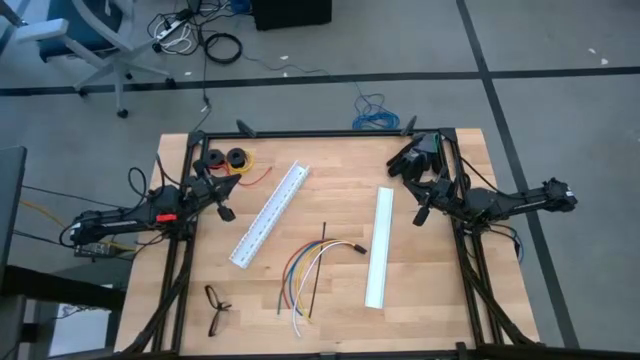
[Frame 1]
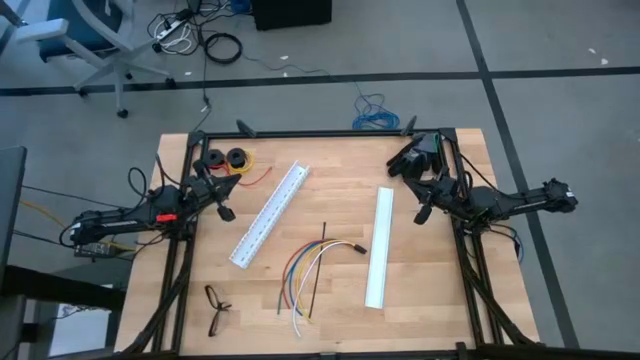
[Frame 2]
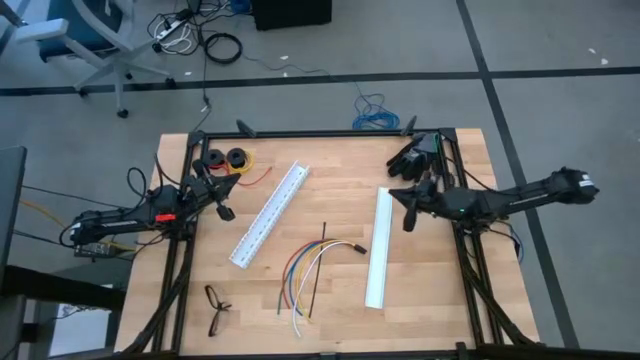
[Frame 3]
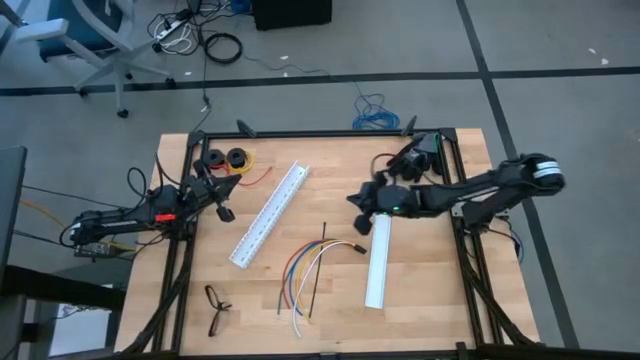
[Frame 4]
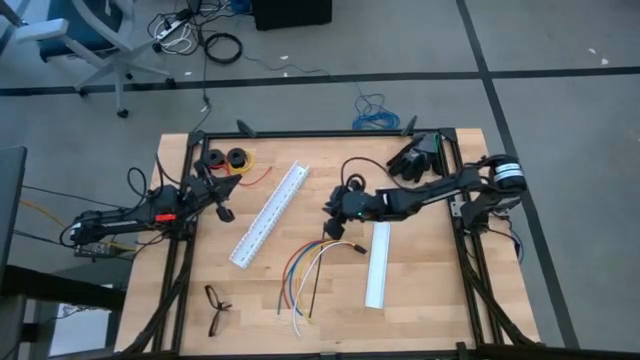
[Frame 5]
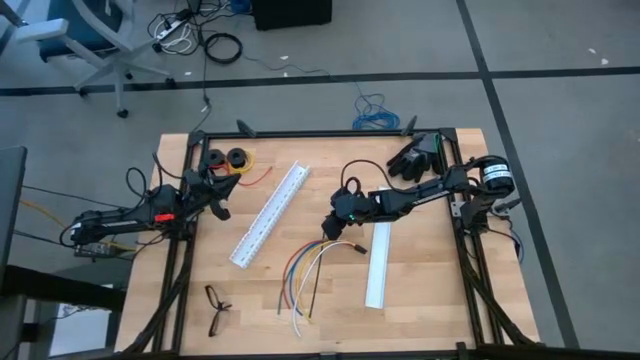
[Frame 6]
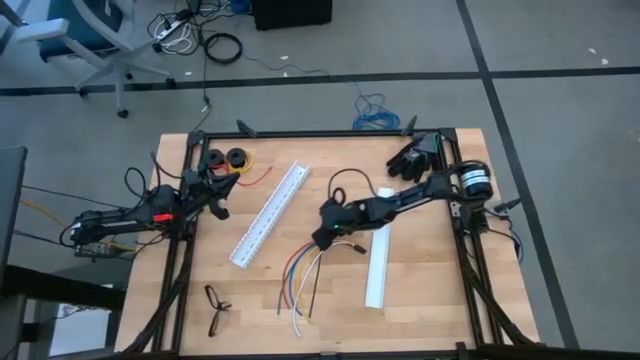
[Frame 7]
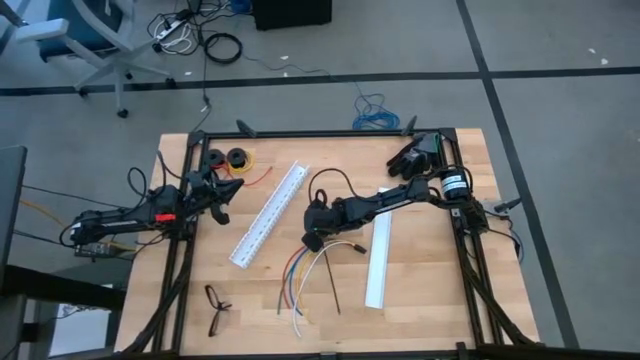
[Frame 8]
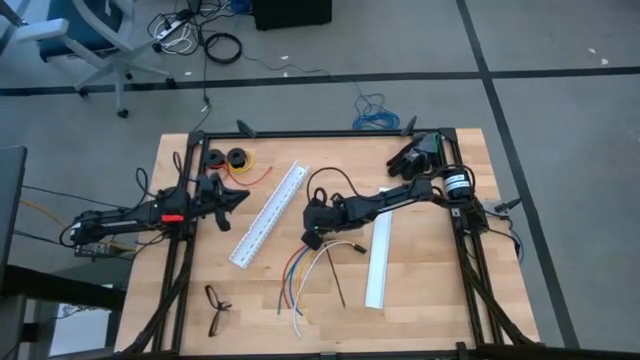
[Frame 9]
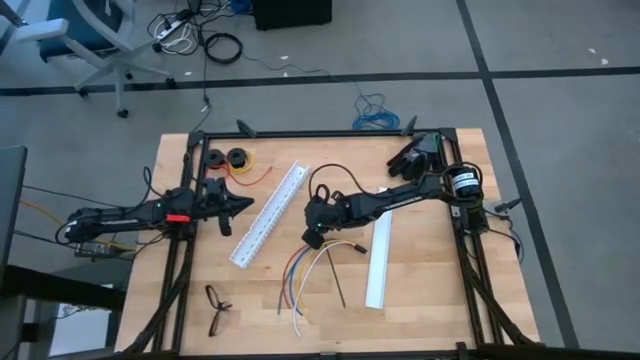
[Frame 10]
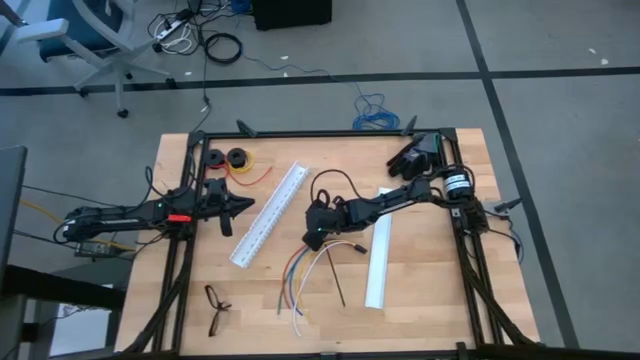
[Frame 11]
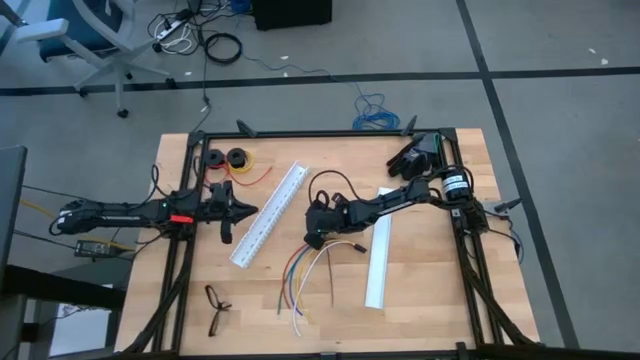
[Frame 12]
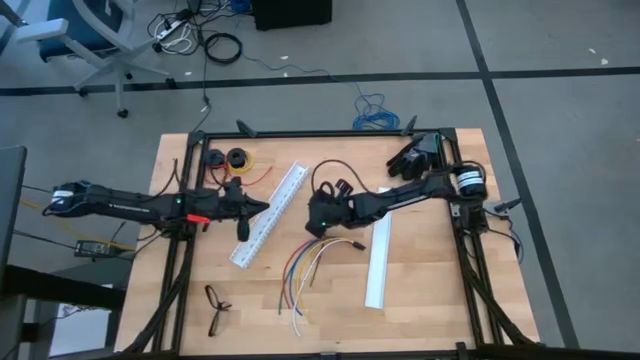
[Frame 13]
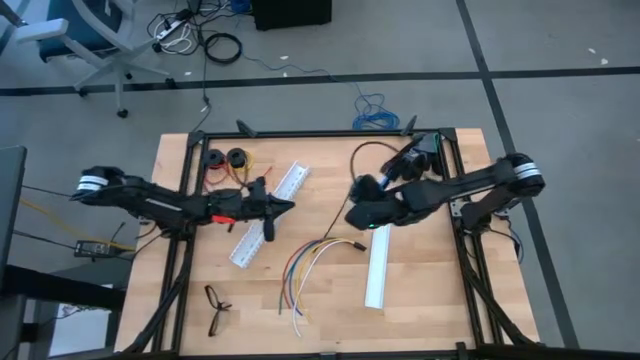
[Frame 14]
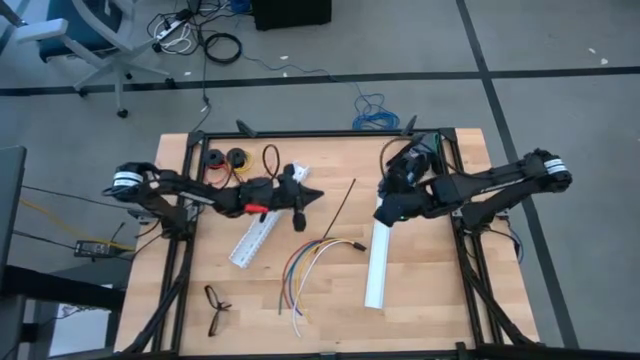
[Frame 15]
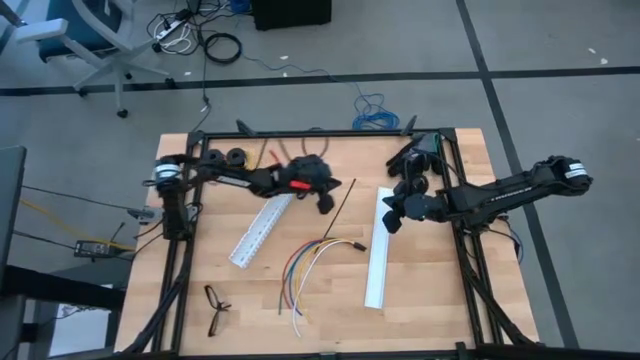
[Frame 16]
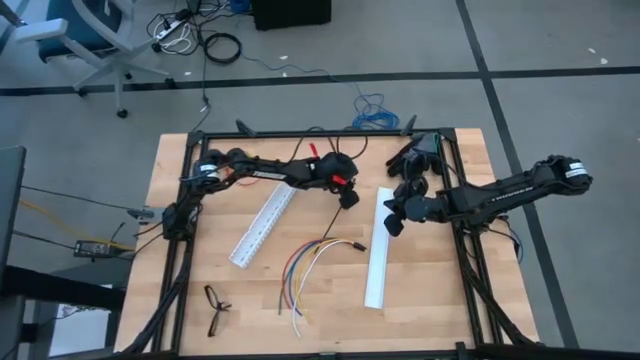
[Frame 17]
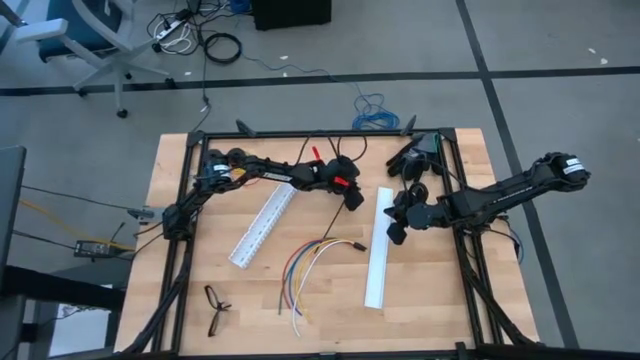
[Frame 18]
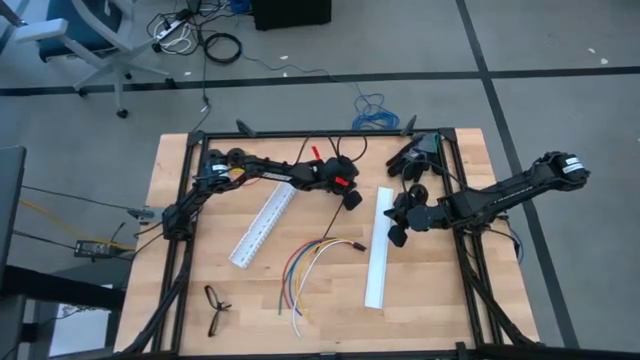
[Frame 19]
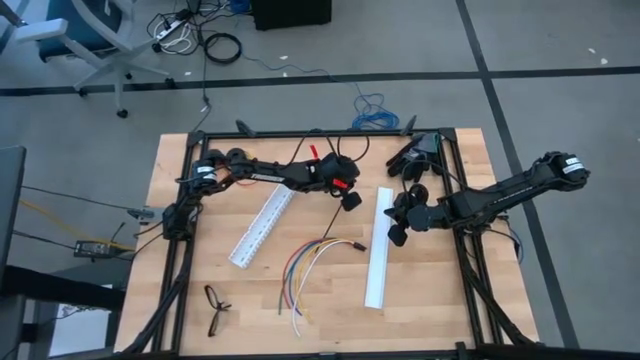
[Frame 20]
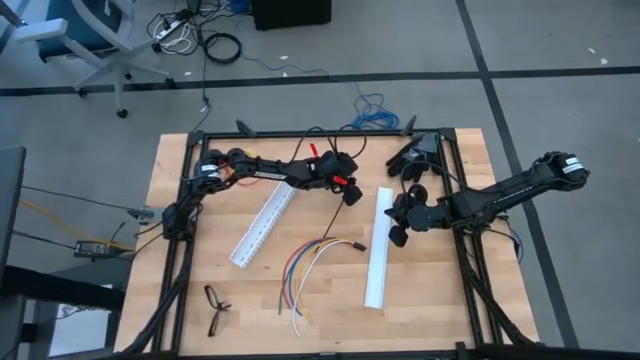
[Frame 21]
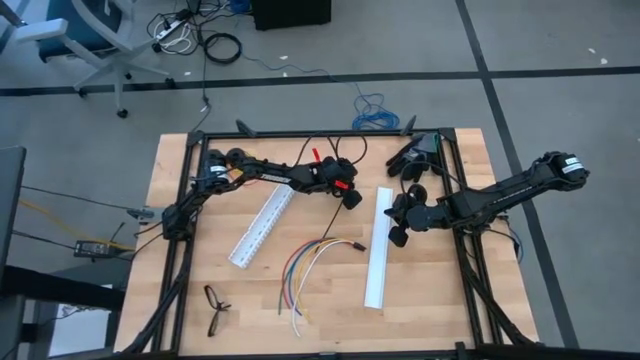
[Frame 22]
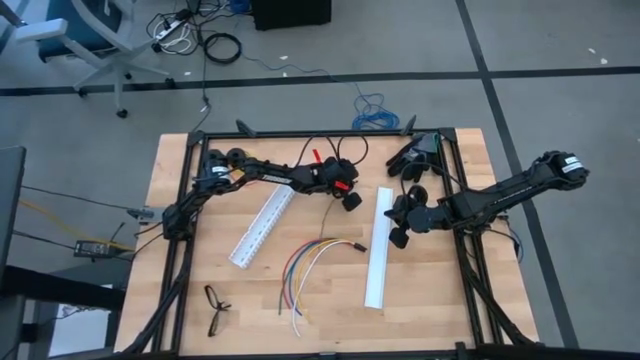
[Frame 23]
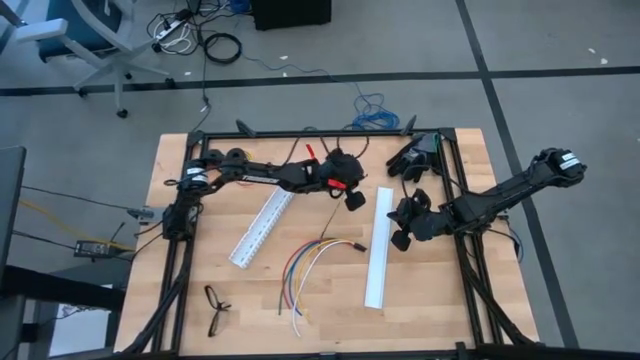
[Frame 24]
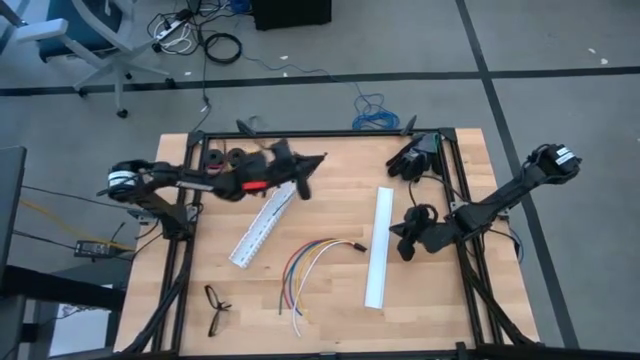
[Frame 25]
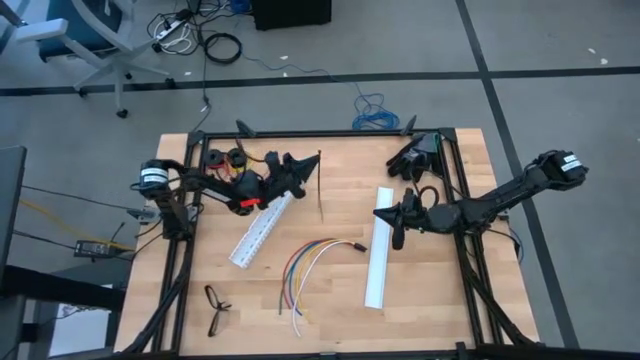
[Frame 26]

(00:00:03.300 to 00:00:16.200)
Task: Ziptie cables
Wrap the cable wires together using the black zip tie
